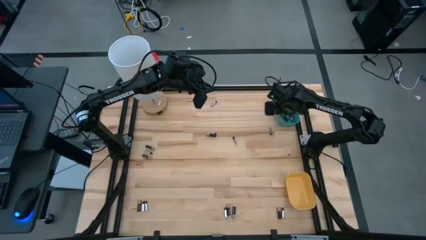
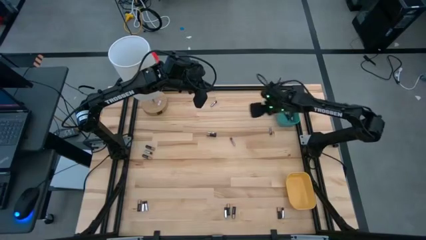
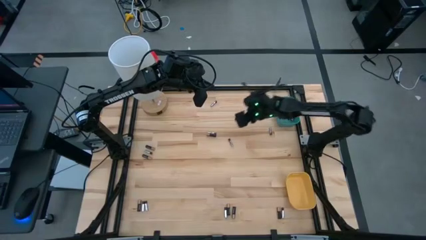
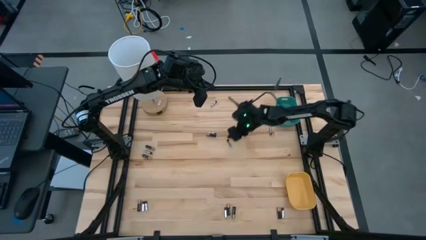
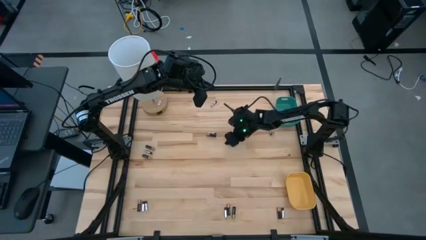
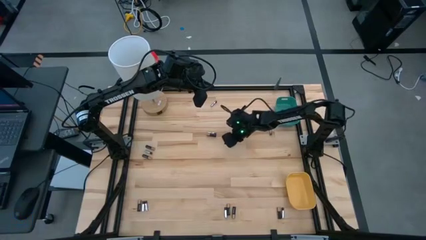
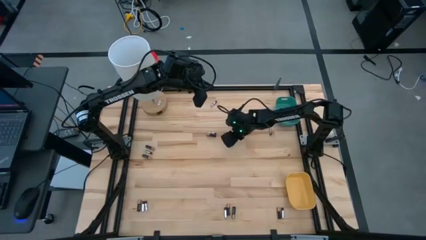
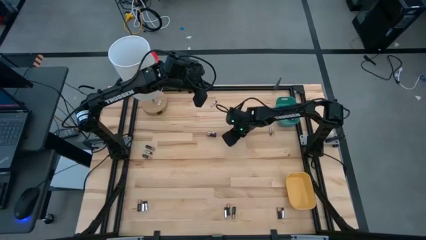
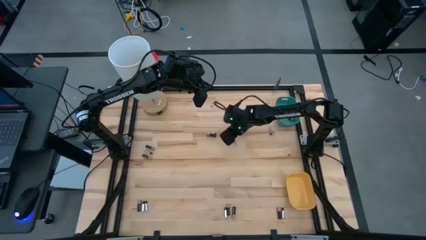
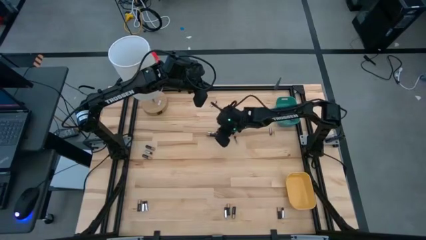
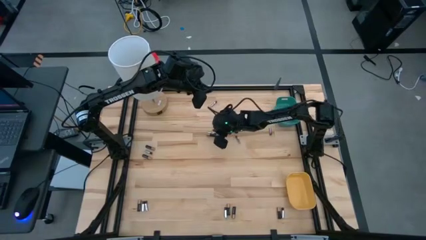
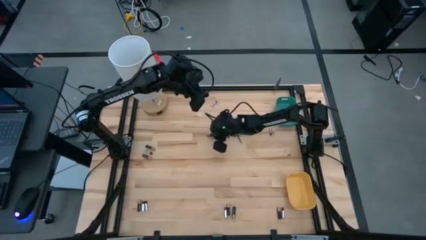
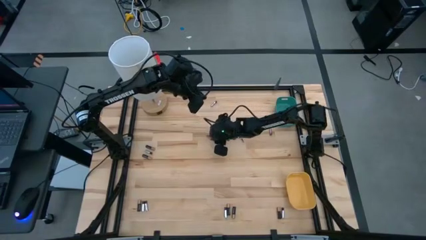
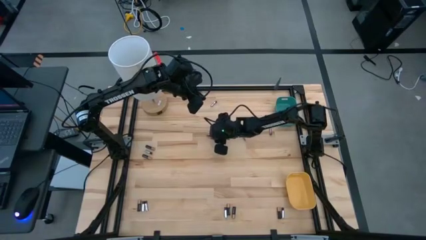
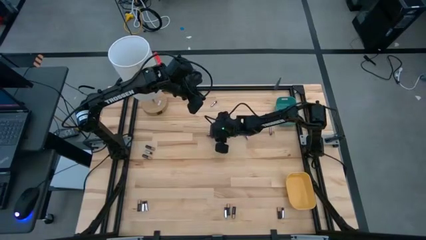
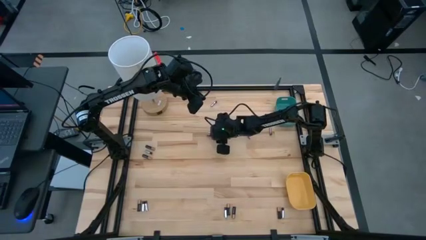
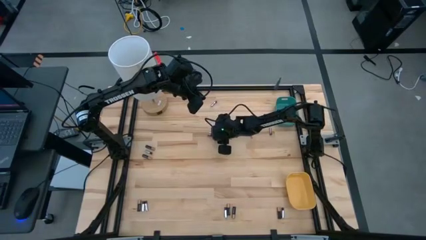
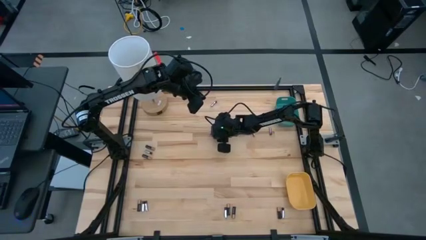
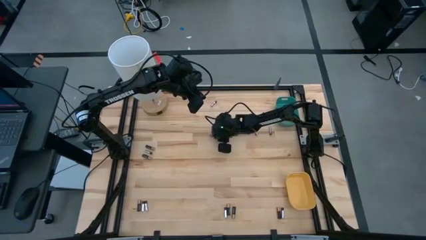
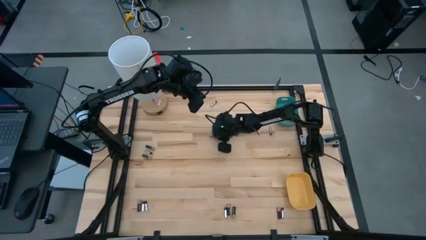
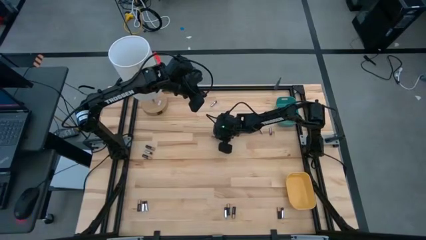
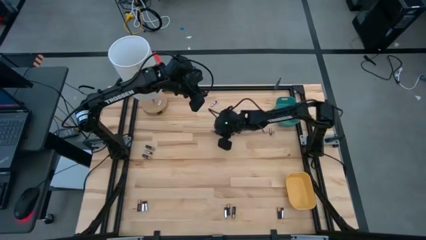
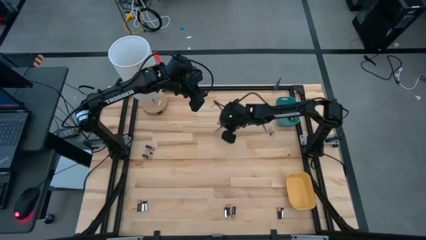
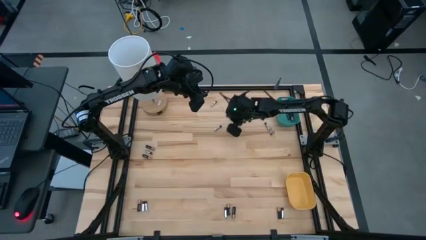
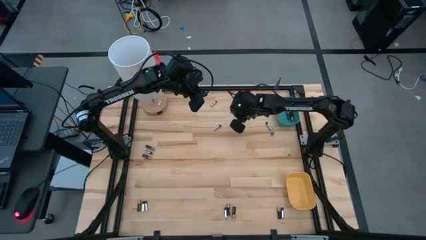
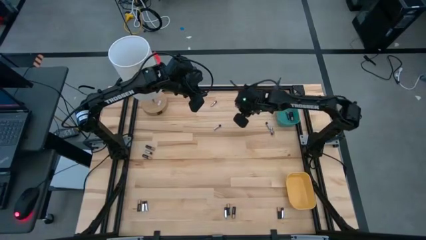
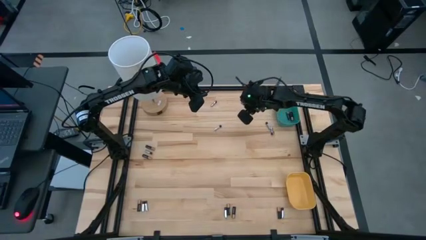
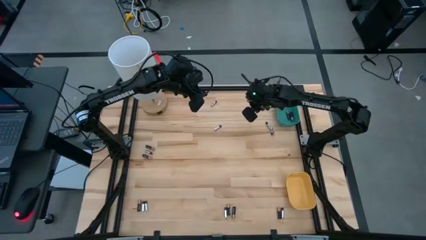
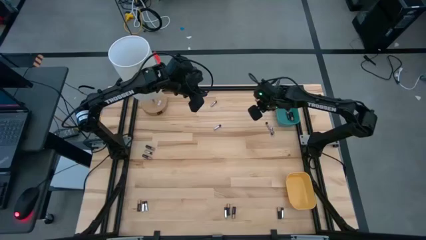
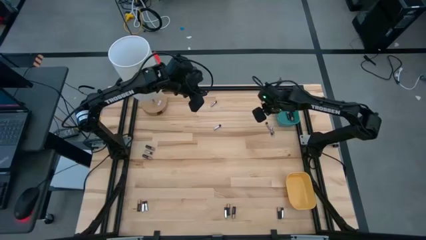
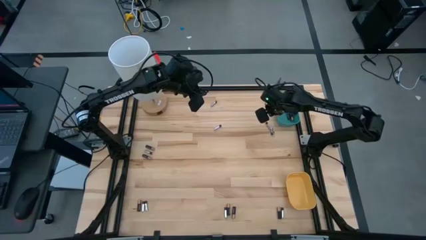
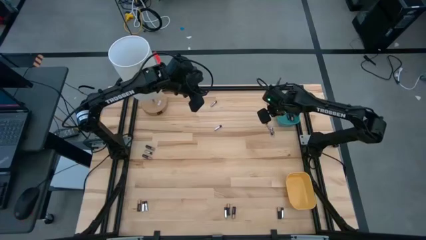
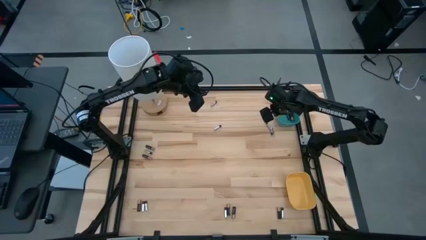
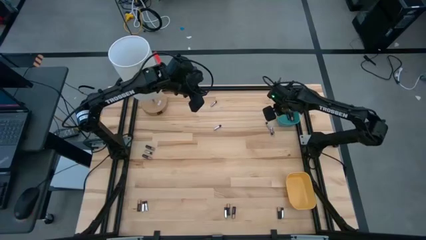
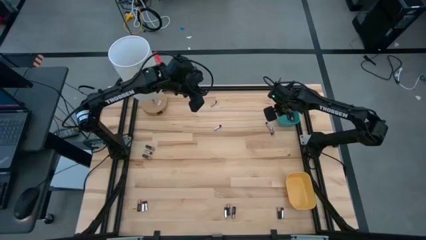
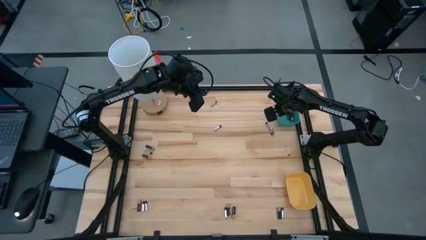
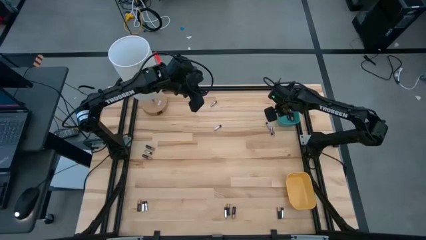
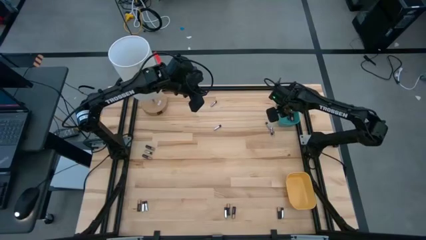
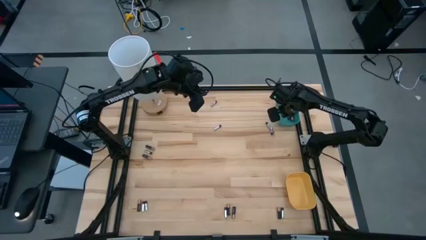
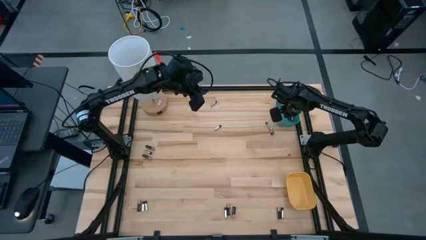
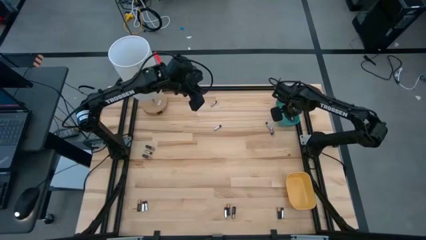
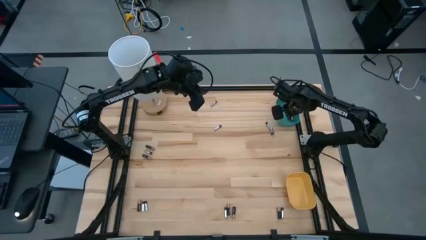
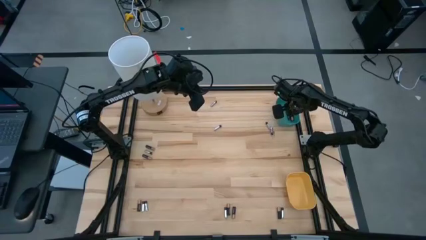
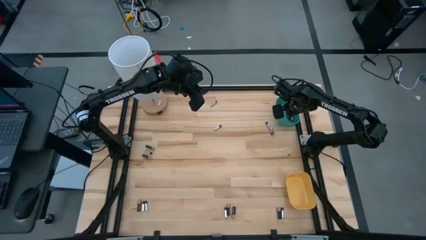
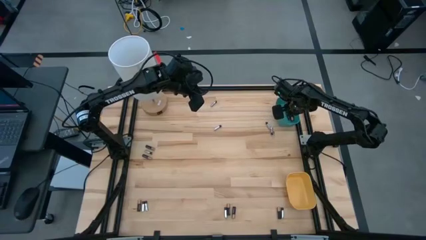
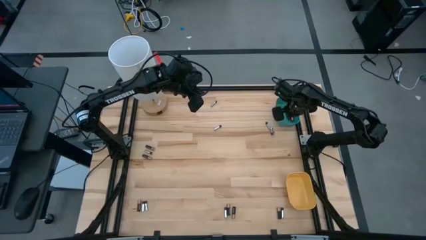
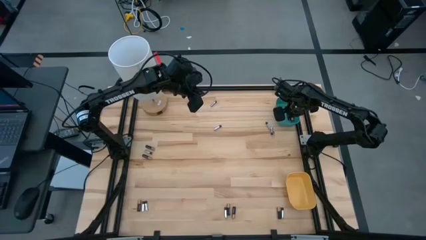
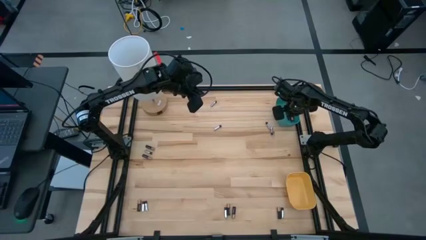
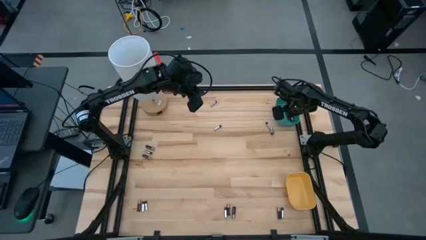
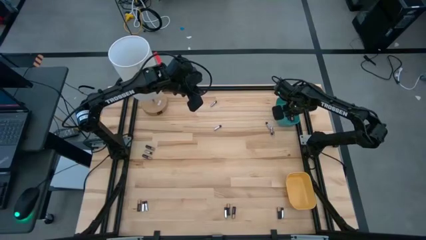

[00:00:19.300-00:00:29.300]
Task: Sort batteries
Put the black battery into the blue bin

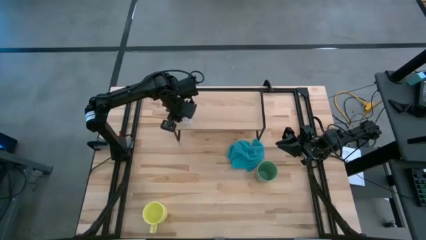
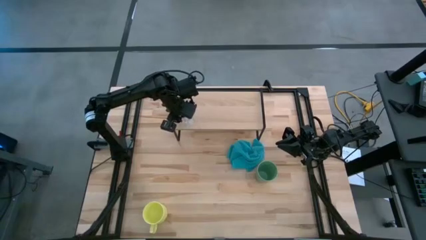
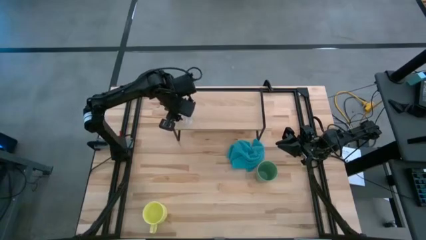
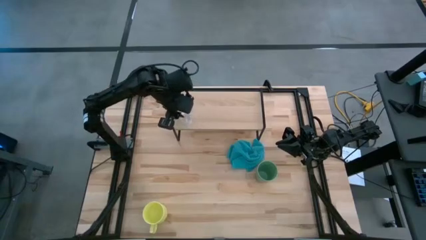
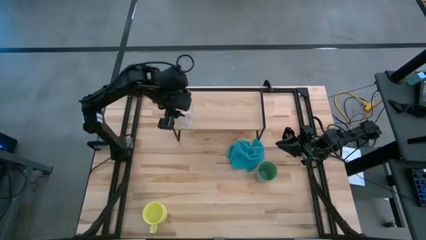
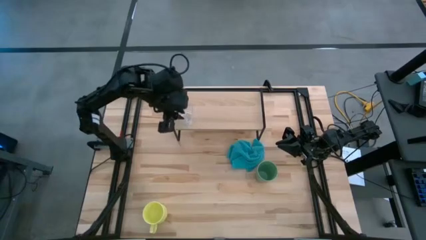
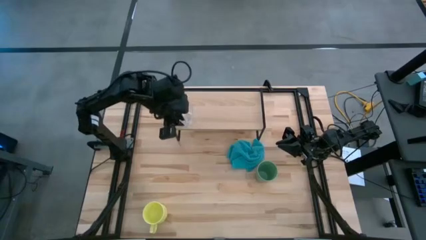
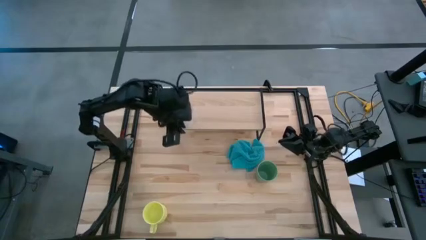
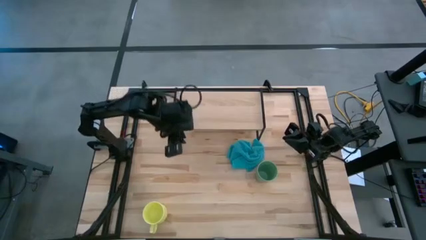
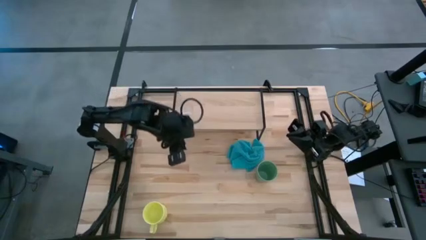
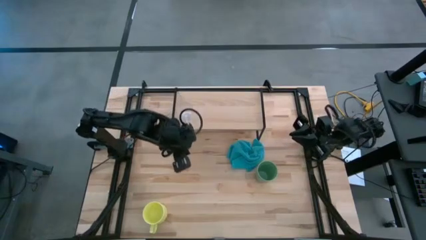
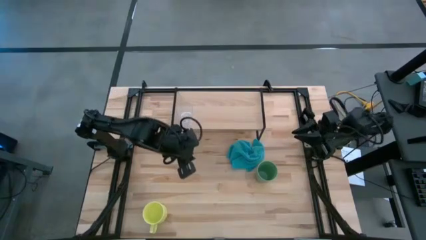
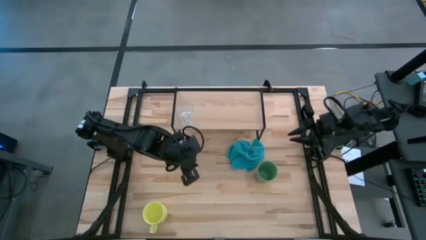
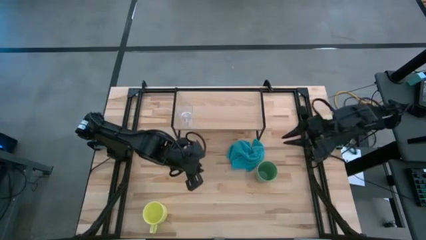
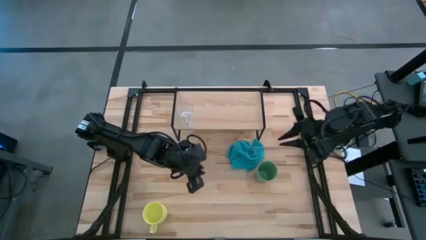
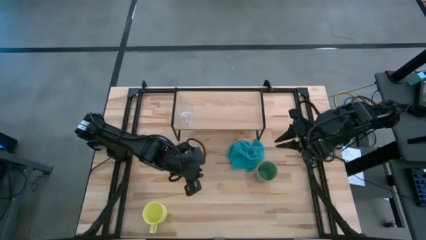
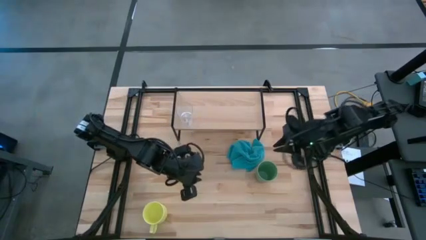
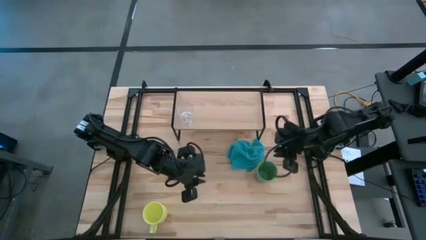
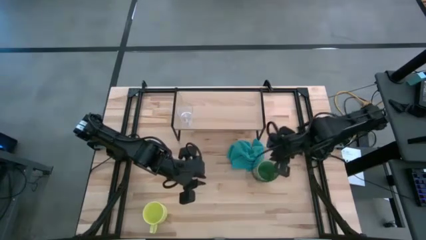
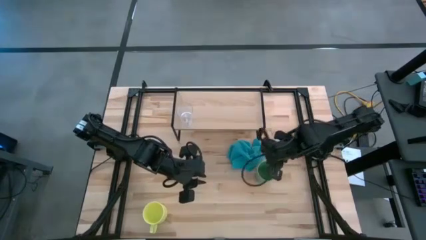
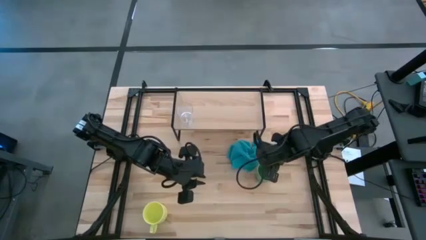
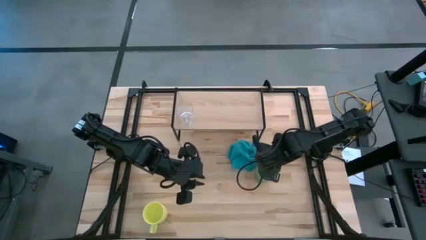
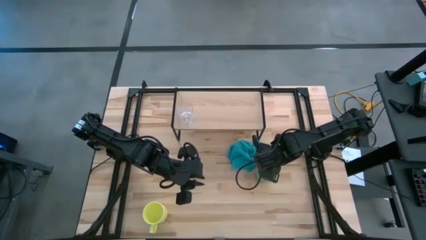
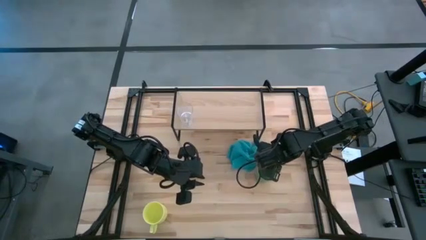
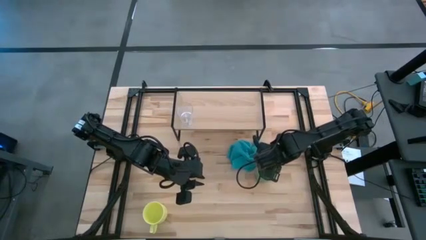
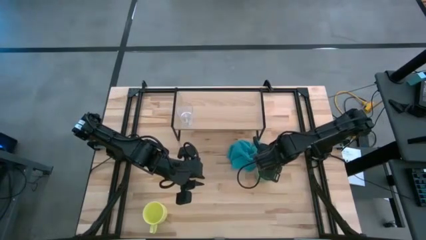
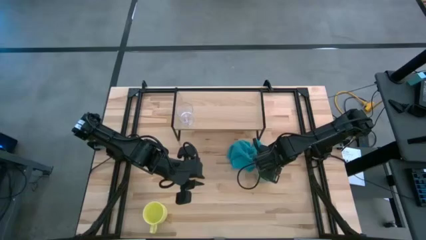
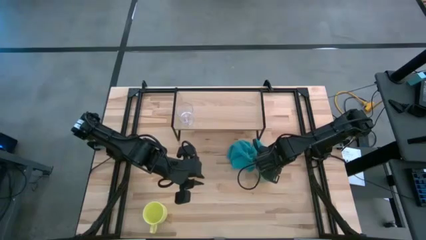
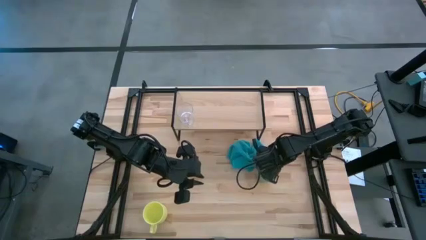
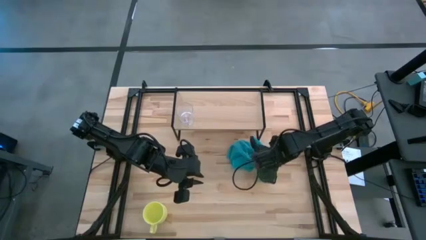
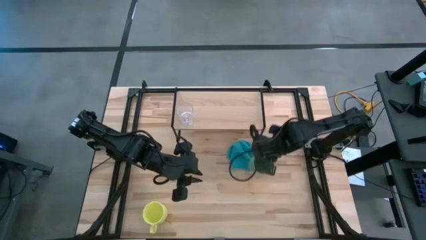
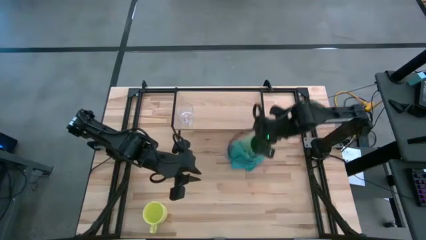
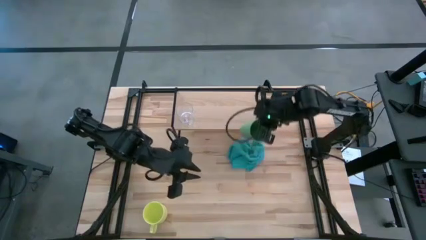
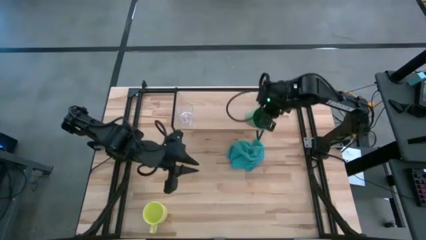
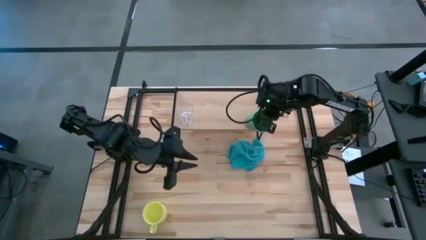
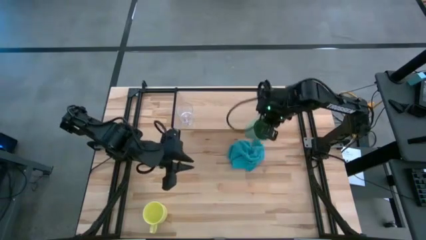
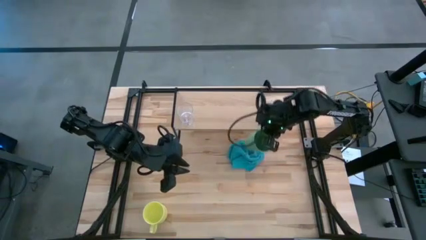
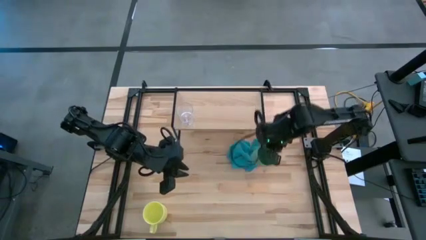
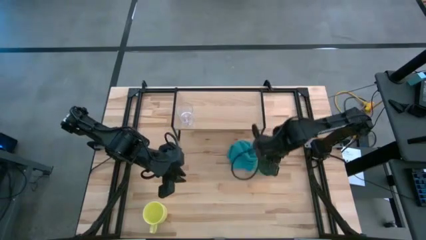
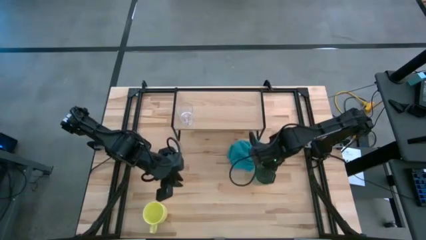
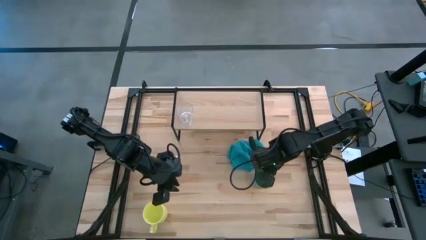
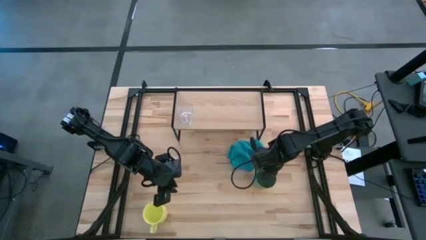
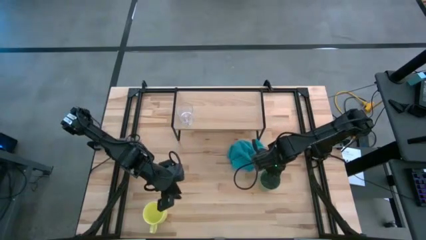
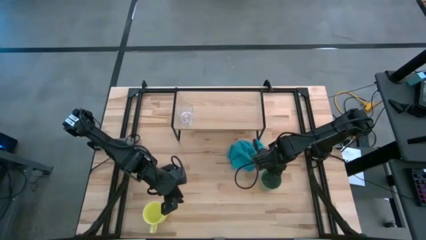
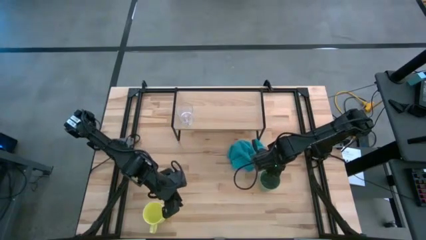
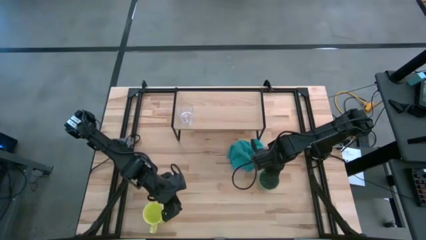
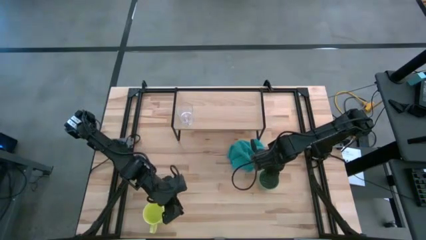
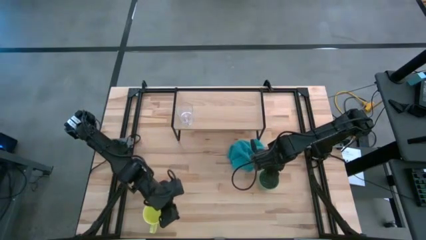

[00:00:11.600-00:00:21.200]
Task: Stack small to large cups/mugs on shelf
Put the green cup on the shelf
